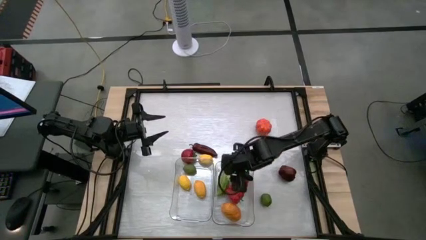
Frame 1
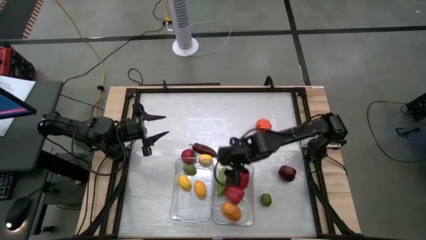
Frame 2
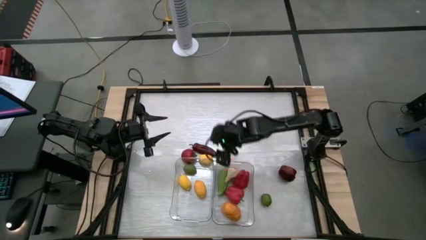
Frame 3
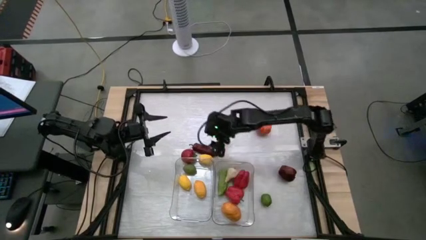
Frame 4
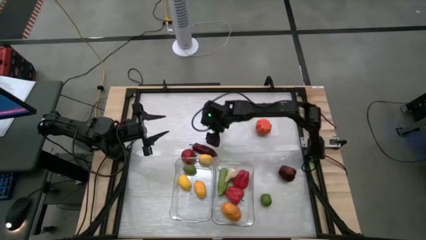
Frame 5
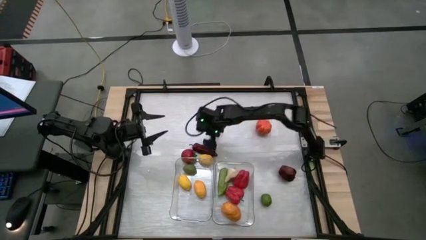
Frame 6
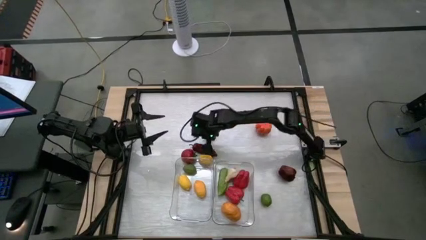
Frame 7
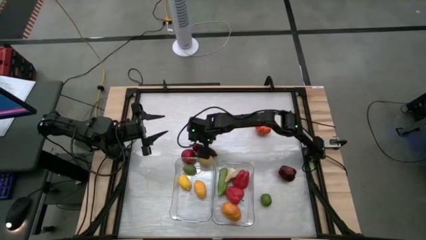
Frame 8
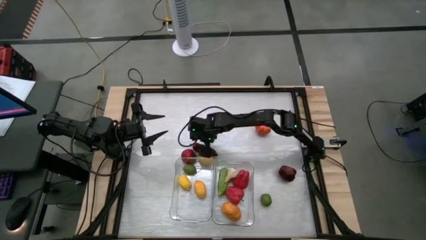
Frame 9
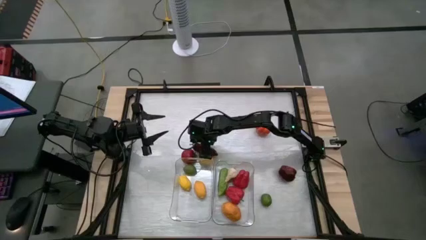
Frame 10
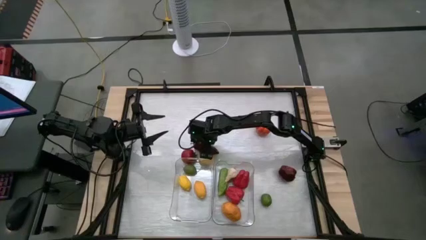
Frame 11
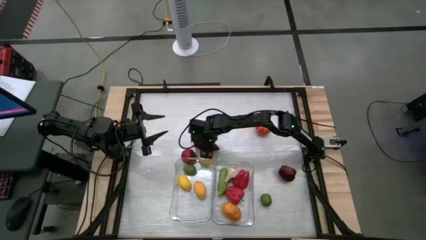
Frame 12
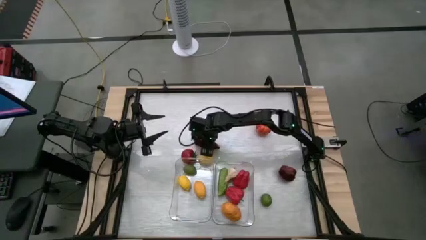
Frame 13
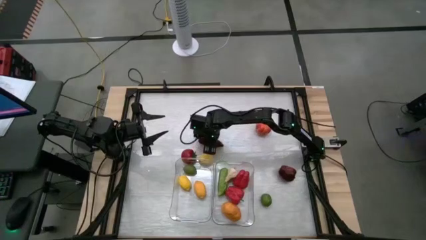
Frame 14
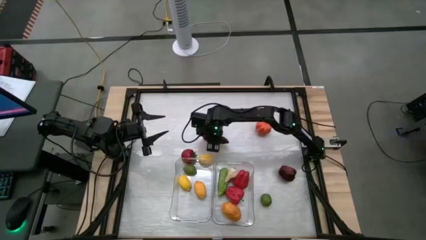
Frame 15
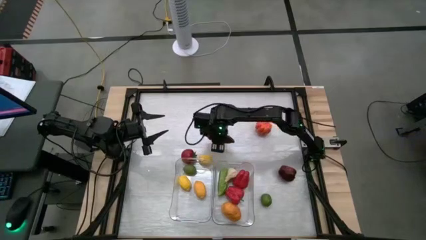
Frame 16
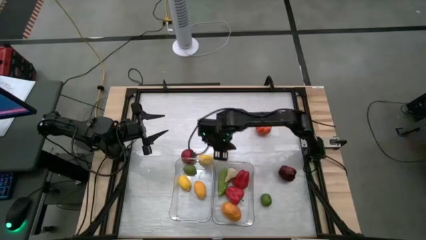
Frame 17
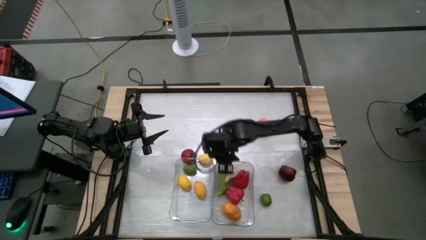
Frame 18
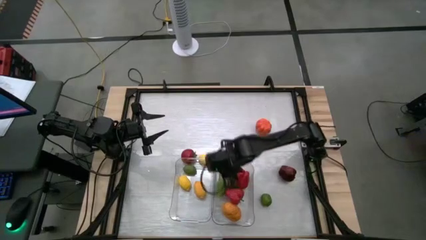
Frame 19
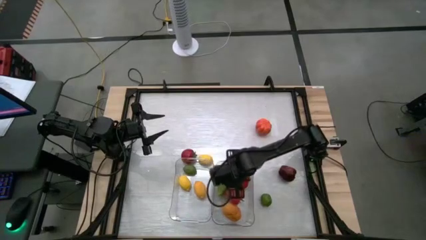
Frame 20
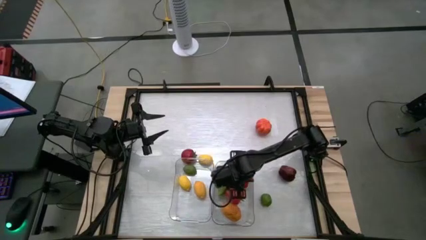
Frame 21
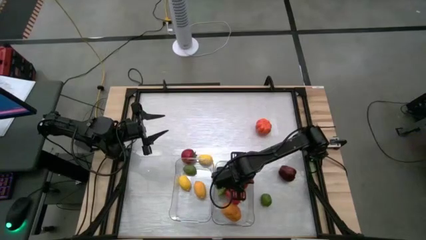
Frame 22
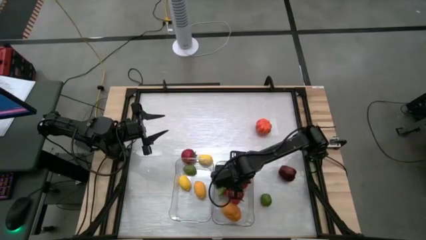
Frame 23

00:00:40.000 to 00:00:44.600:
Task: Sort produce into baskets
Put the chili pepper into the right transparent bin

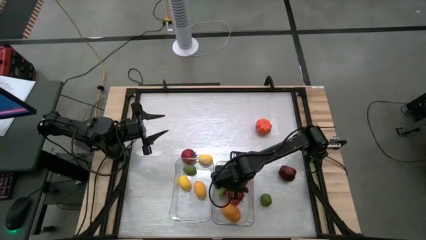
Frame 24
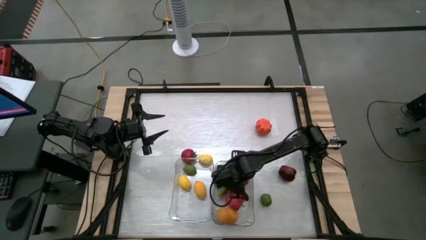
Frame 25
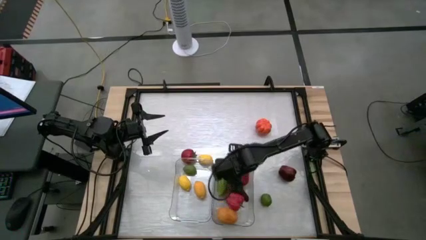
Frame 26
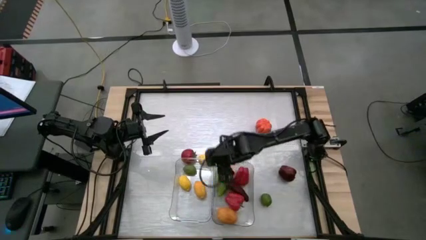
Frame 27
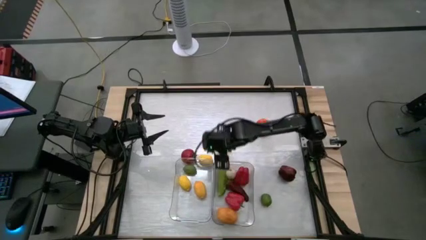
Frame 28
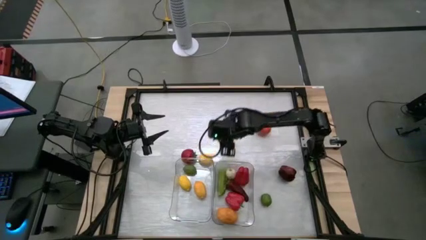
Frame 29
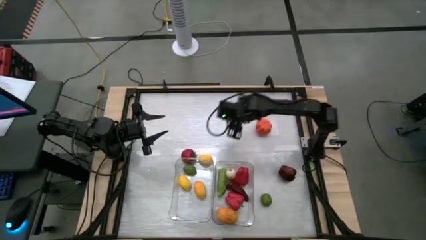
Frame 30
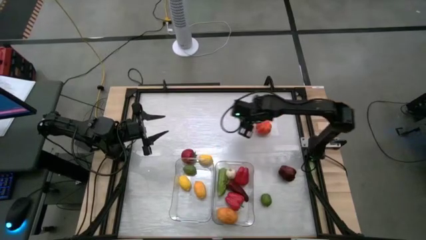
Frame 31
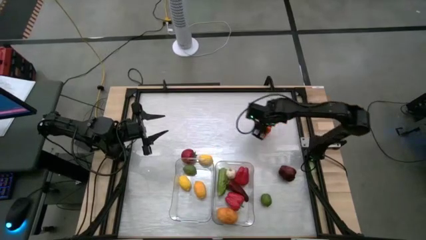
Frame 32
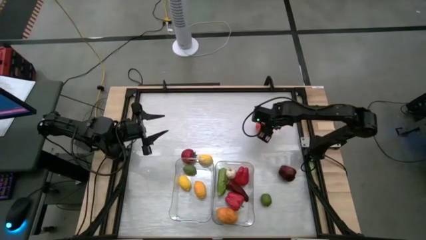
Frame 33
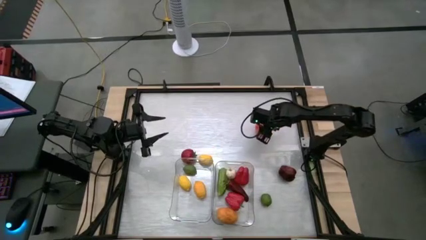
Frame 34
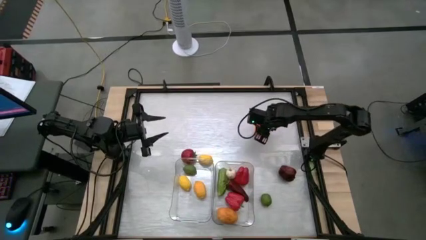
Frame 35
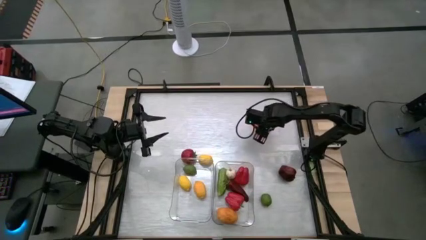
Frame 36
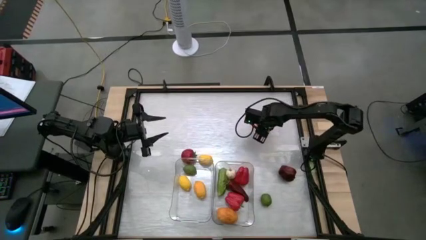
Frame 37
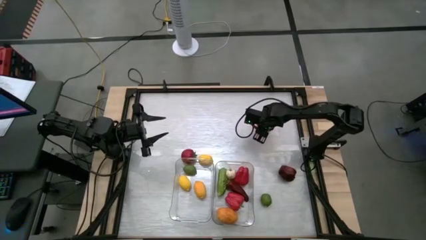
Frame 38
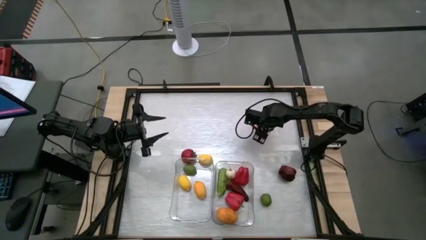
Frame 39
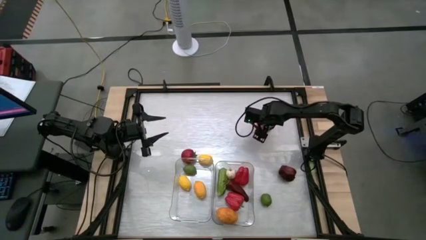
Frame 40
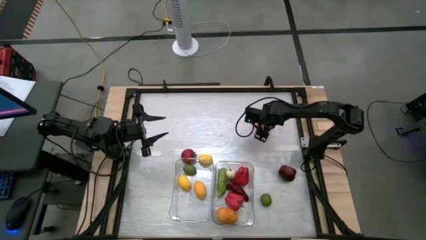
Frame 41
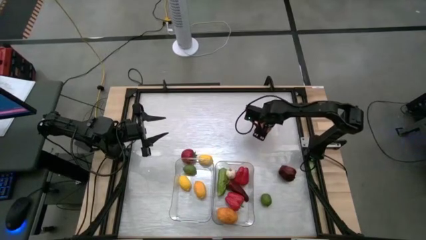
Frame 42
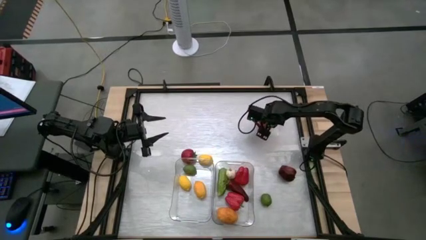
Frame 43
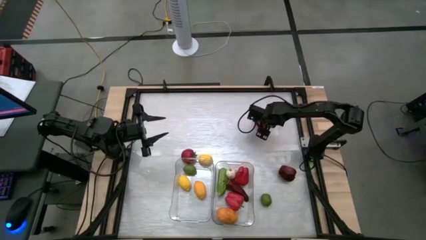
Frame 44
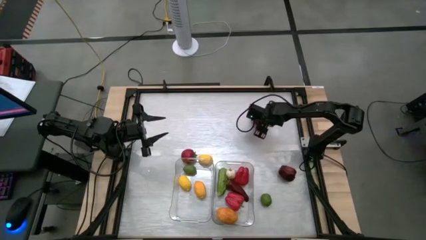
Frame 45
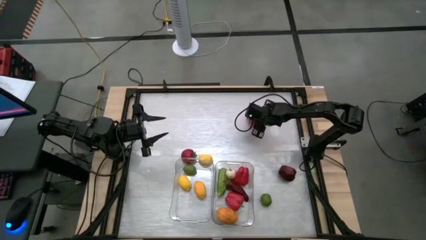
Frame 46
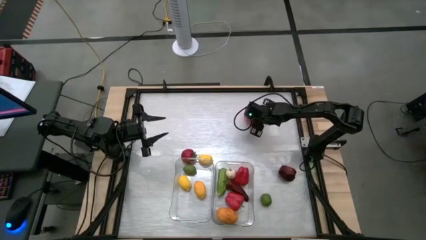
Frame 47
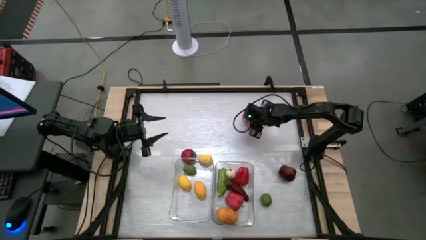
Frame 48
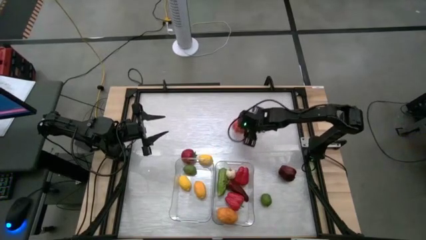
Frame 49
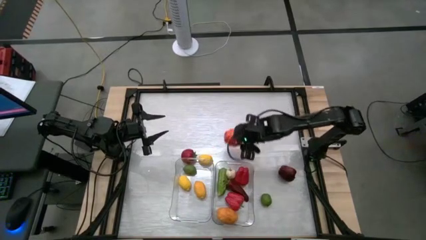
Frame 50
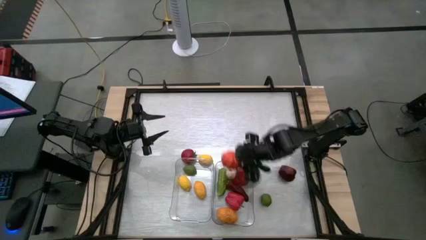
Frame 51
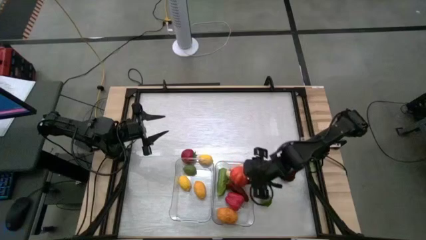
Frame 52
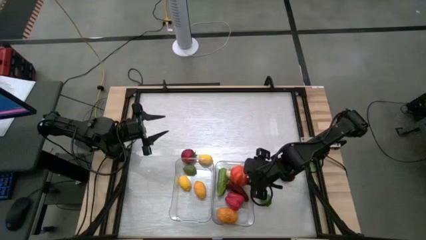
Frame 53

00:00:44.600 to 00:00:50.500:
Put the pumpkin into the right transparent bin

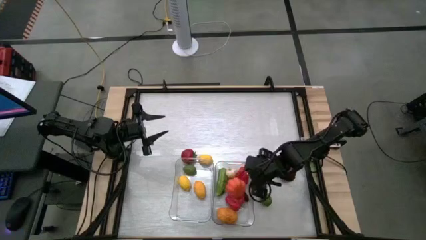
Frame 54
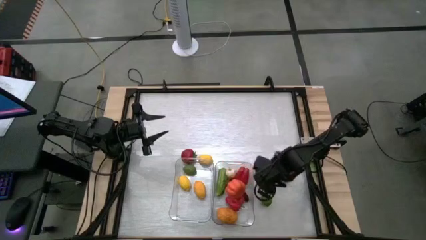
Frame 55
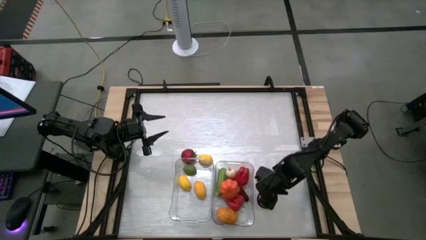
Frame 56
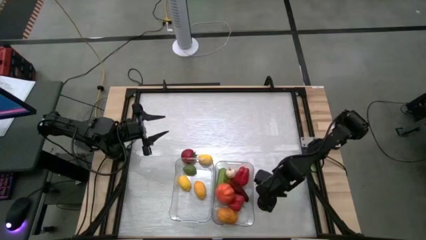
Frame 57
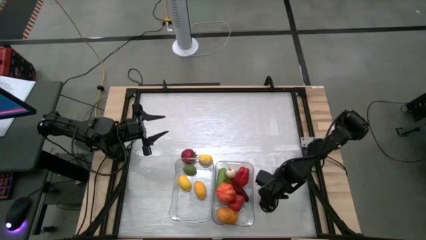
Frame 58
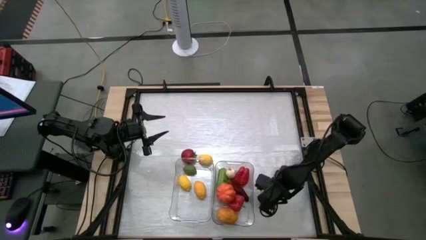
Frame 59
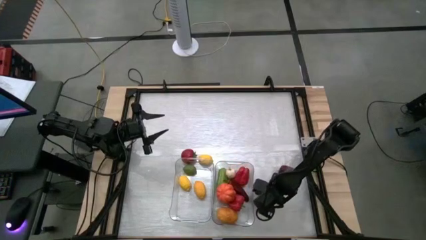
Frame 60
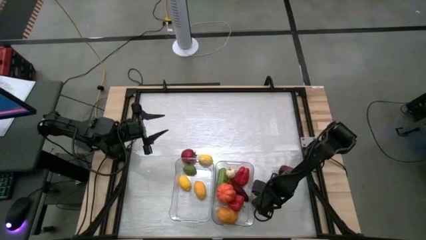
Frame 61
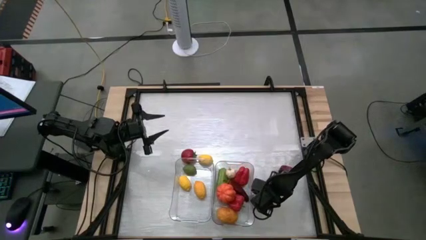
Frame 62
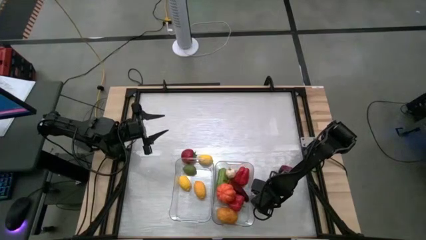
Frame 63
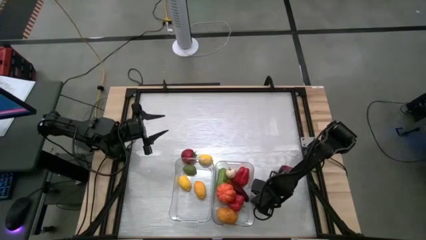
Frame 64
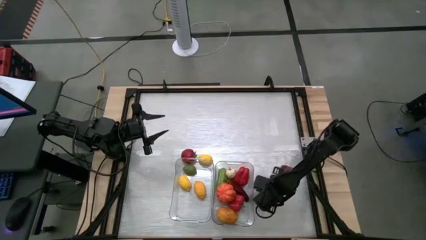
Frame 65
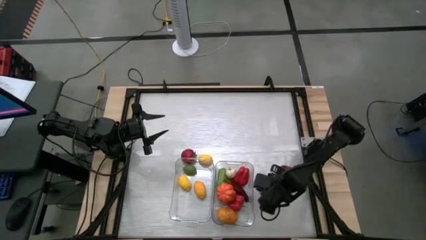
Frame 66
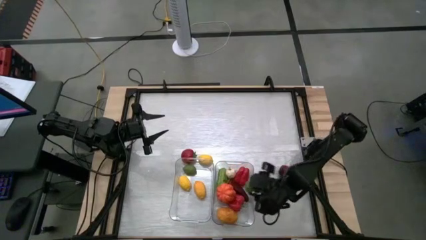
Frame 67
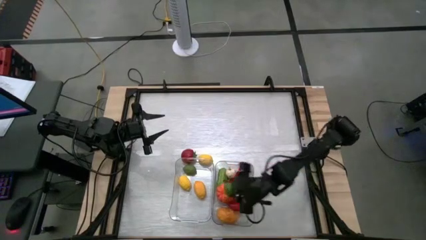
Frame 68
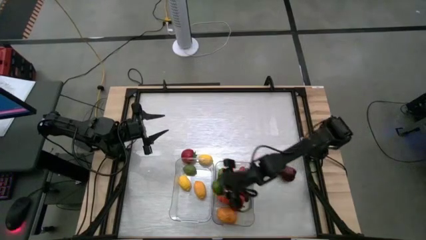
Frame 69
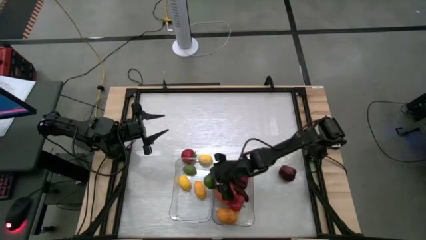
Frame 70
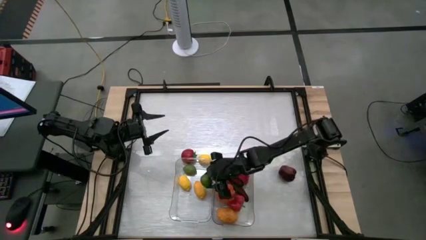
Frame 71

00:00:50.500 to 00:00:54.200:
Put the lime into the left transparent bin

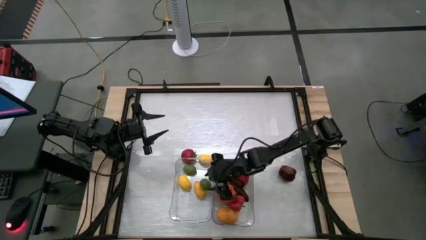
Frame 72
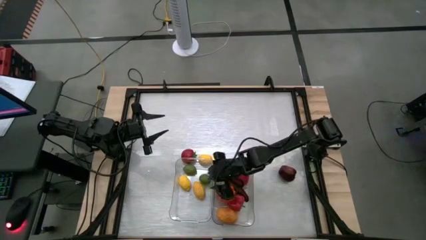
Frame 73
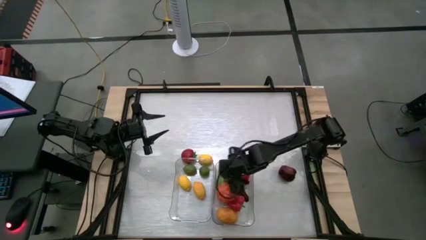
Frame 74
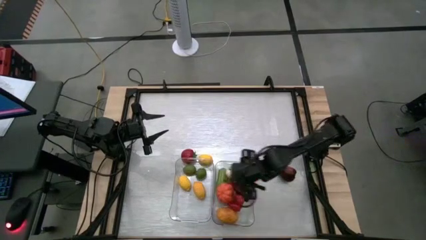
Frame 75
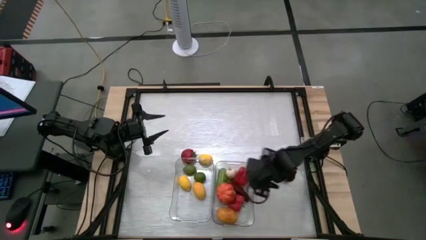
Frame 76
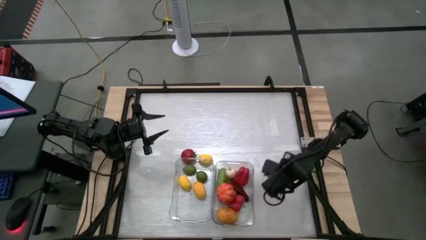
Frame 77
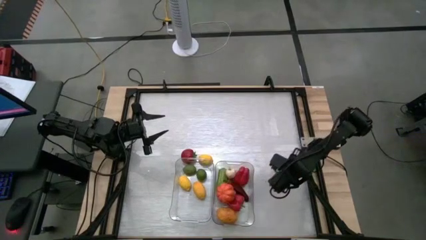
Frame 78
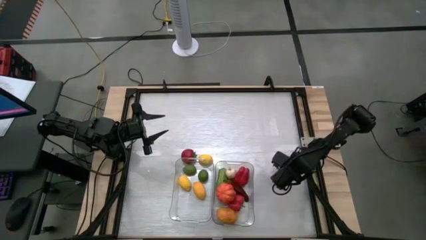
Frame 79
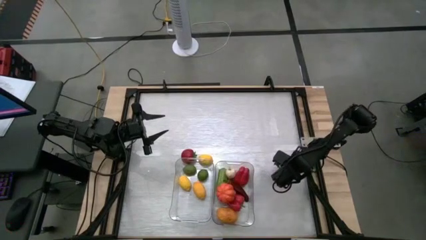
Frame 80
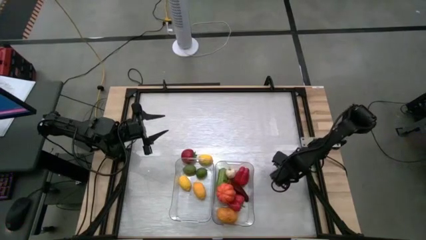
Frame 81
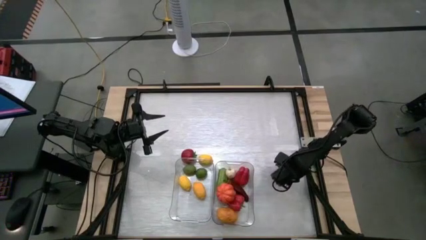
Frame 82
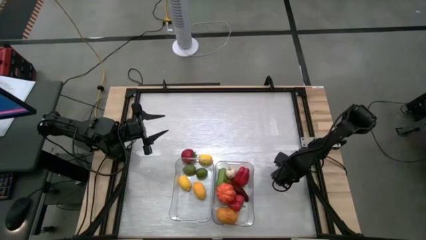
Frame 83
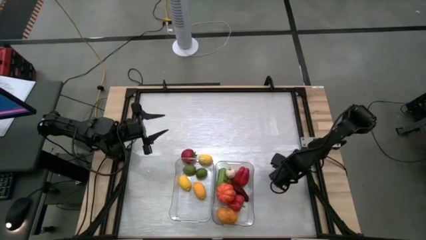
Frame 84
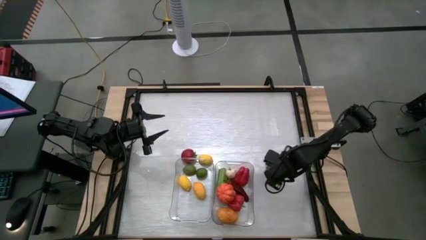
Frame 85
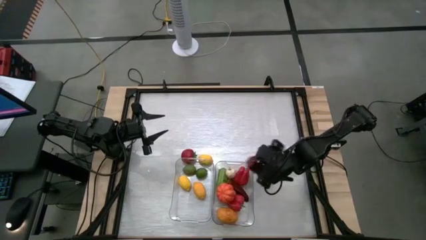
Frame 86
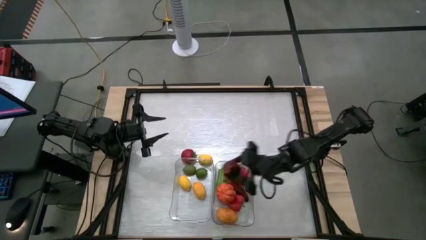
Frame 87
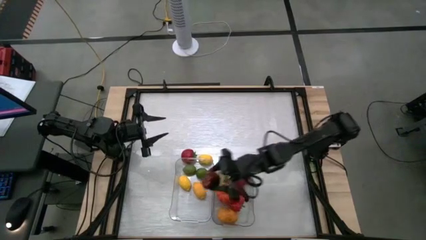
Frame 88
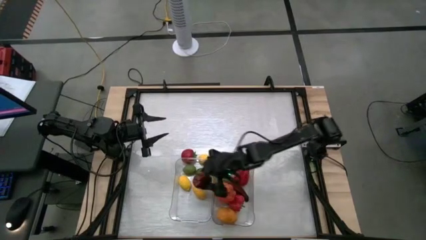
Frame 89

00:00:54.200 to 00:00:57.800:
Put the red apple into the left transparent bin
